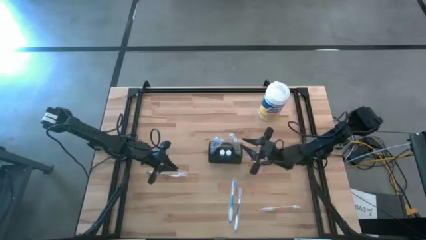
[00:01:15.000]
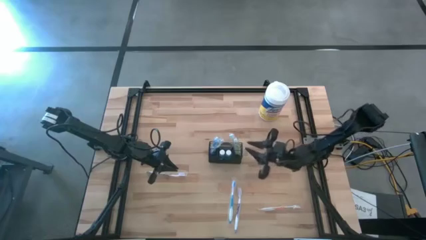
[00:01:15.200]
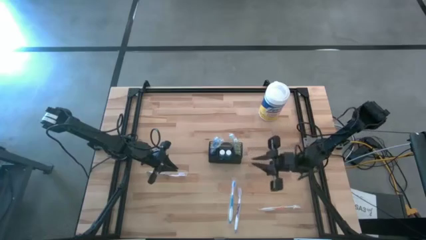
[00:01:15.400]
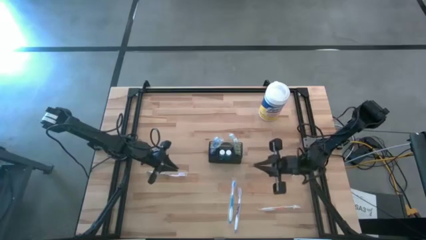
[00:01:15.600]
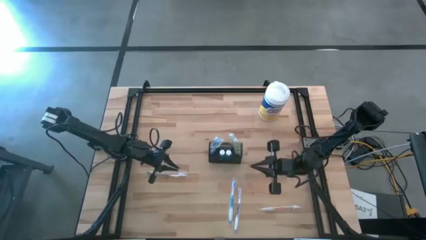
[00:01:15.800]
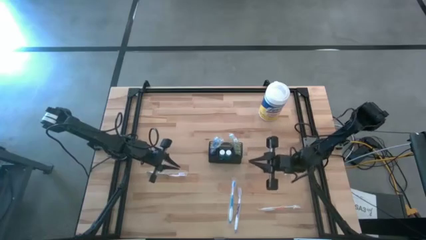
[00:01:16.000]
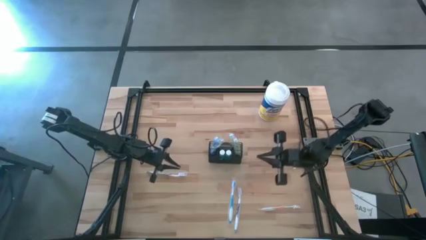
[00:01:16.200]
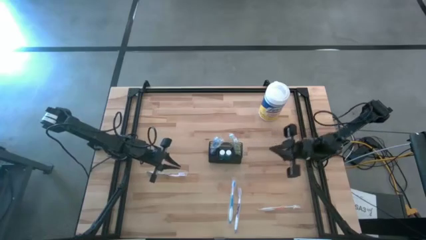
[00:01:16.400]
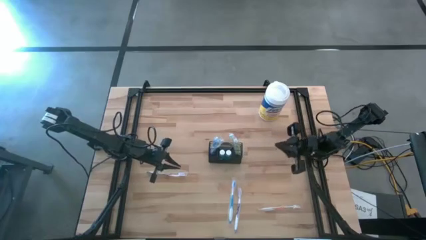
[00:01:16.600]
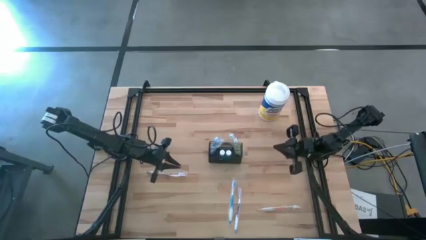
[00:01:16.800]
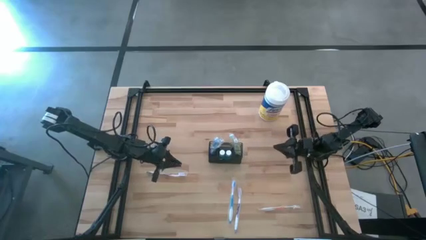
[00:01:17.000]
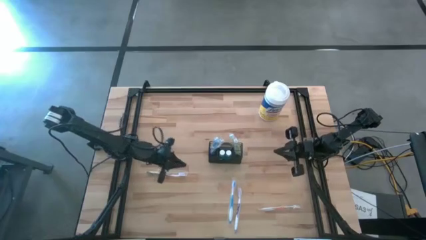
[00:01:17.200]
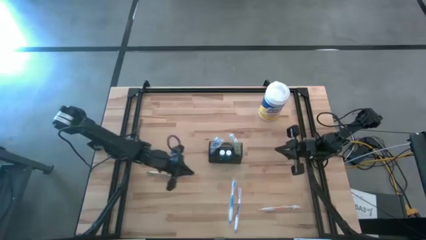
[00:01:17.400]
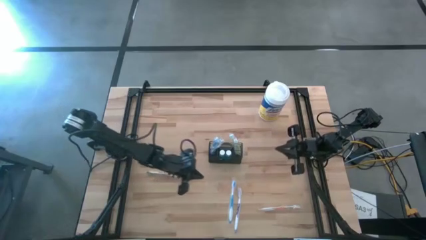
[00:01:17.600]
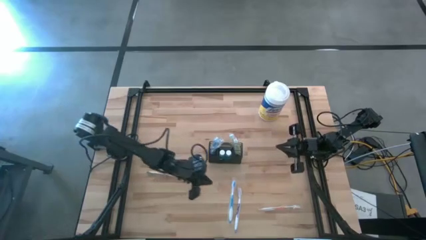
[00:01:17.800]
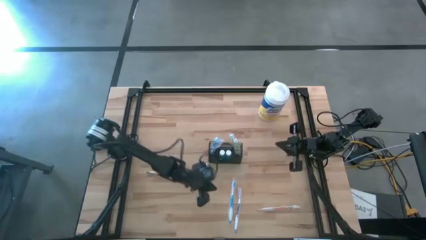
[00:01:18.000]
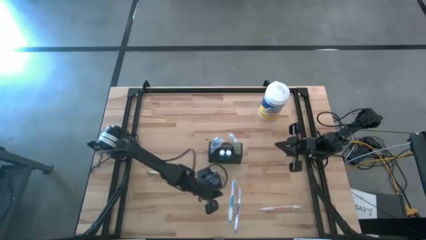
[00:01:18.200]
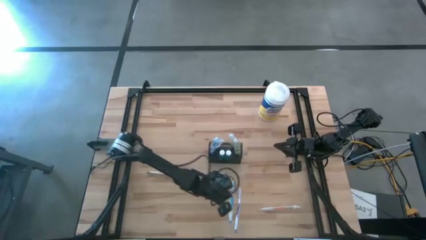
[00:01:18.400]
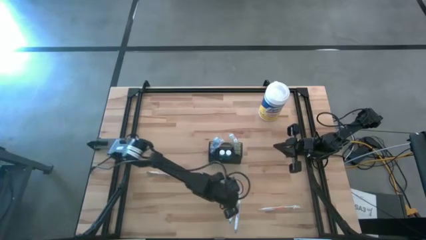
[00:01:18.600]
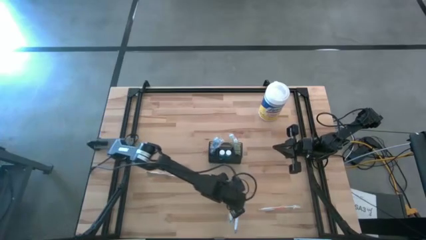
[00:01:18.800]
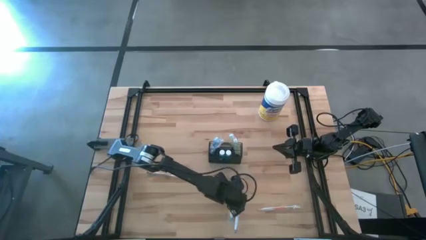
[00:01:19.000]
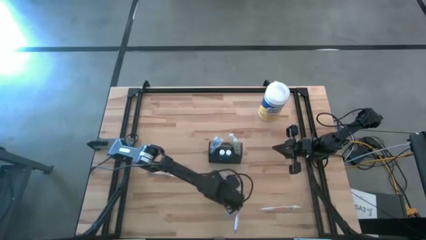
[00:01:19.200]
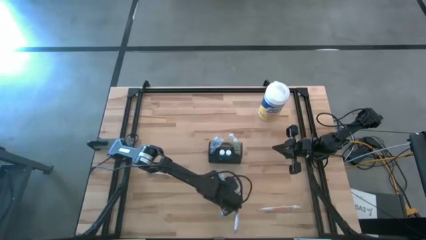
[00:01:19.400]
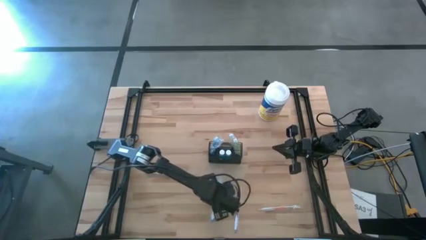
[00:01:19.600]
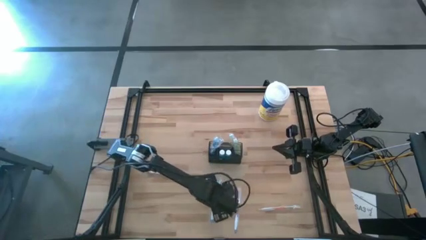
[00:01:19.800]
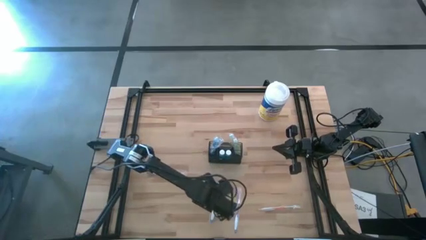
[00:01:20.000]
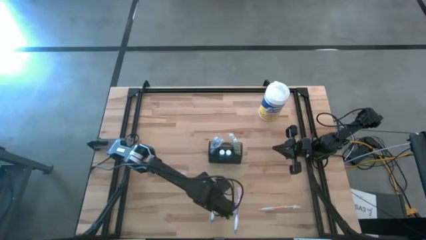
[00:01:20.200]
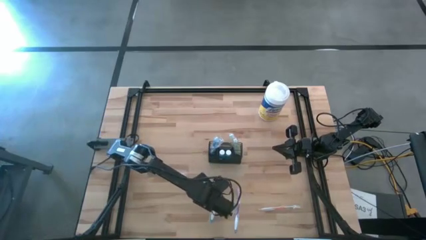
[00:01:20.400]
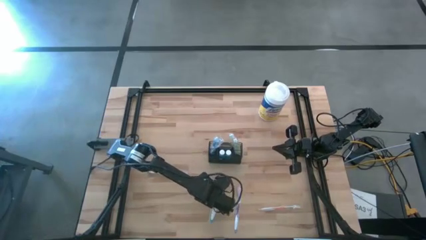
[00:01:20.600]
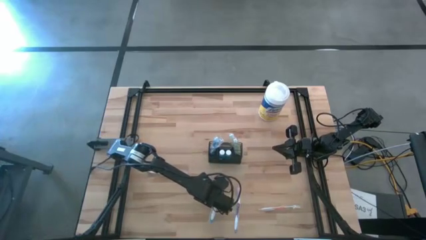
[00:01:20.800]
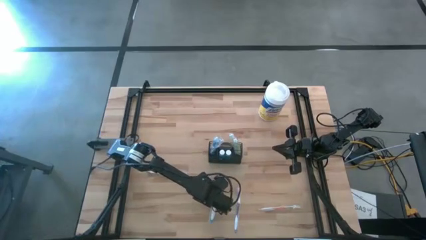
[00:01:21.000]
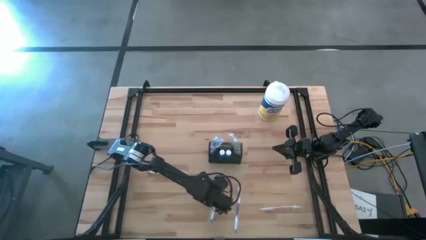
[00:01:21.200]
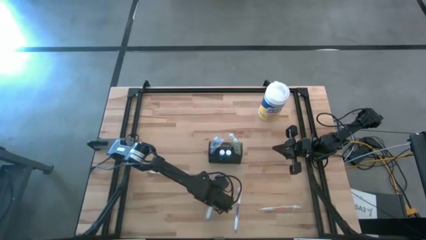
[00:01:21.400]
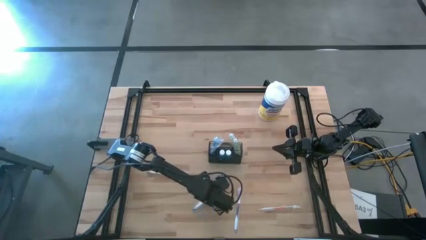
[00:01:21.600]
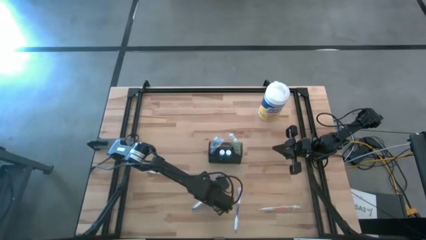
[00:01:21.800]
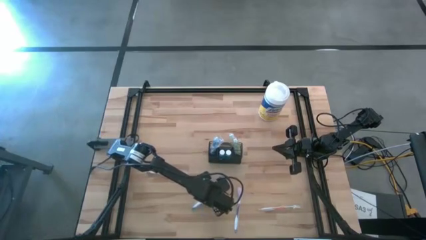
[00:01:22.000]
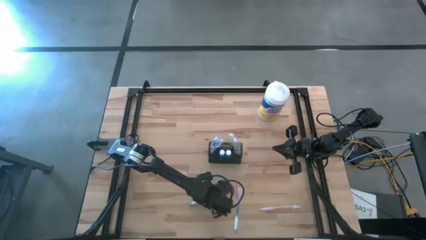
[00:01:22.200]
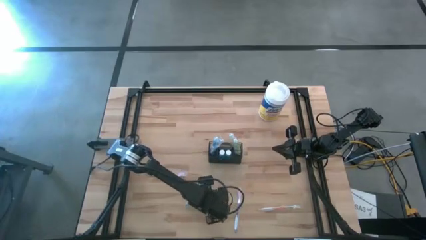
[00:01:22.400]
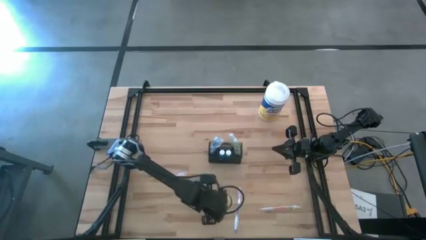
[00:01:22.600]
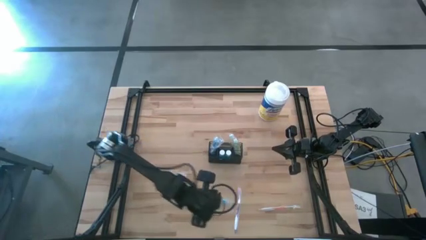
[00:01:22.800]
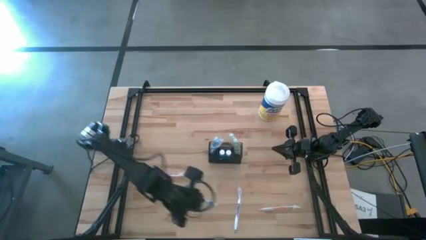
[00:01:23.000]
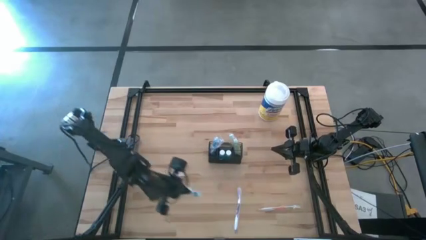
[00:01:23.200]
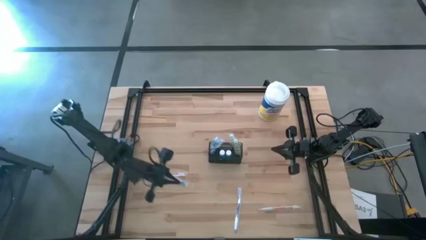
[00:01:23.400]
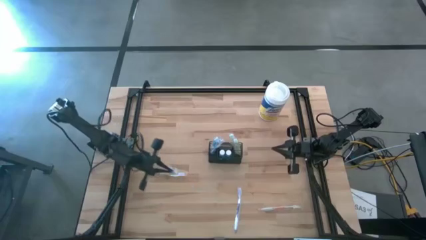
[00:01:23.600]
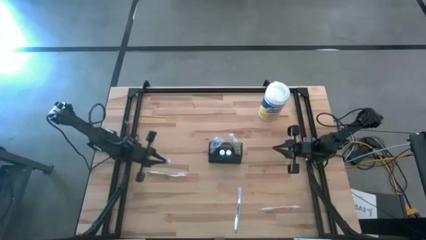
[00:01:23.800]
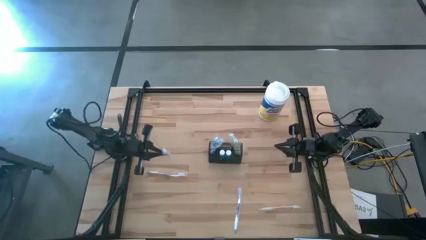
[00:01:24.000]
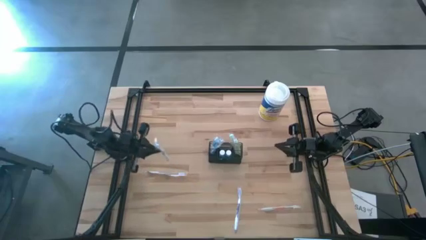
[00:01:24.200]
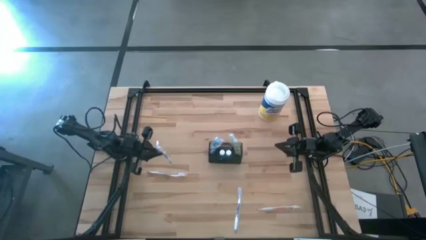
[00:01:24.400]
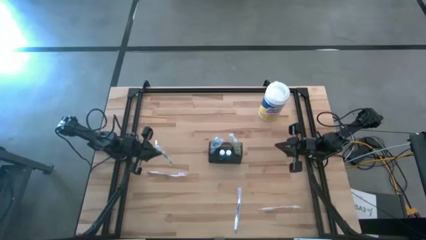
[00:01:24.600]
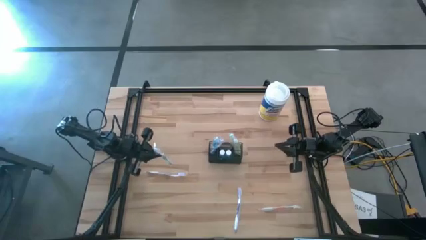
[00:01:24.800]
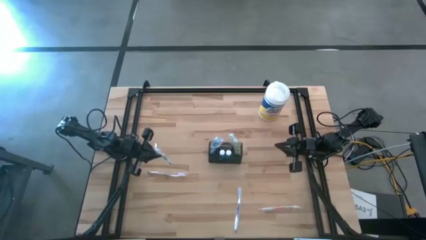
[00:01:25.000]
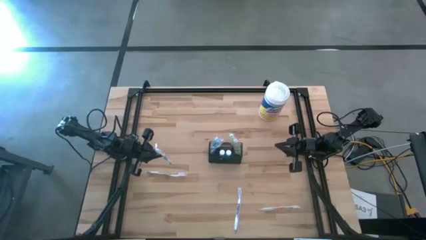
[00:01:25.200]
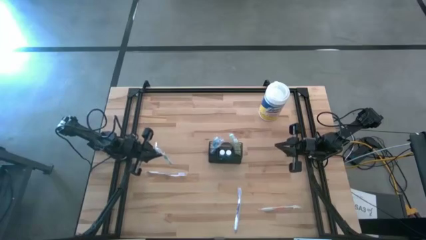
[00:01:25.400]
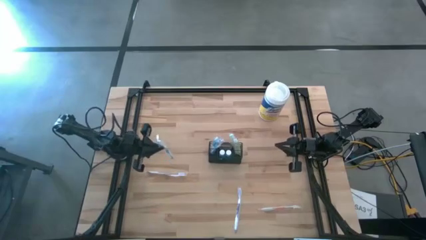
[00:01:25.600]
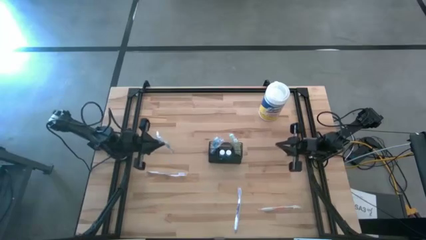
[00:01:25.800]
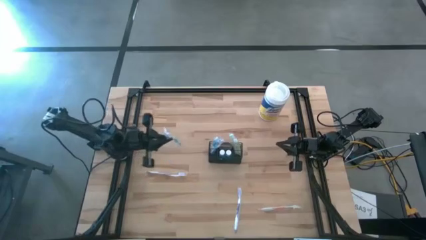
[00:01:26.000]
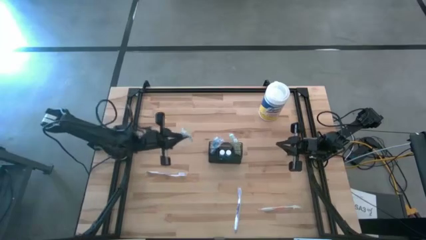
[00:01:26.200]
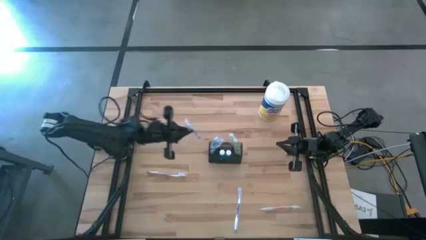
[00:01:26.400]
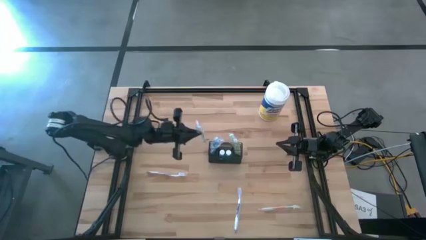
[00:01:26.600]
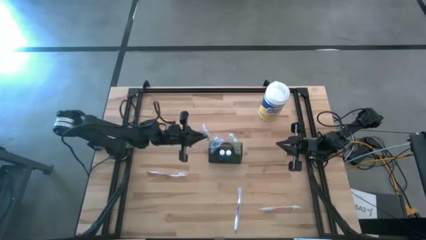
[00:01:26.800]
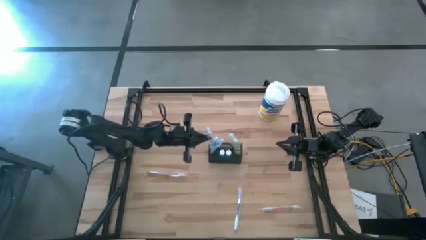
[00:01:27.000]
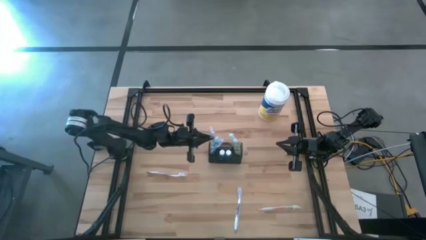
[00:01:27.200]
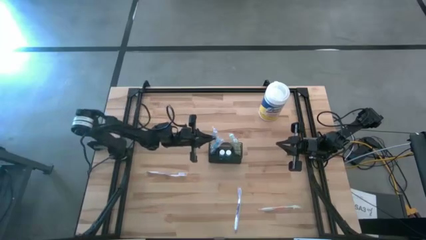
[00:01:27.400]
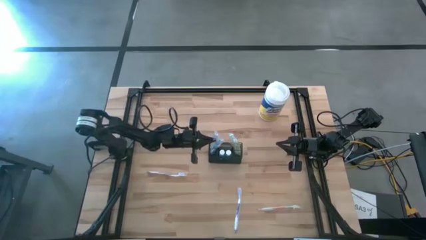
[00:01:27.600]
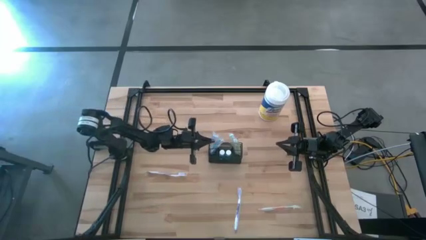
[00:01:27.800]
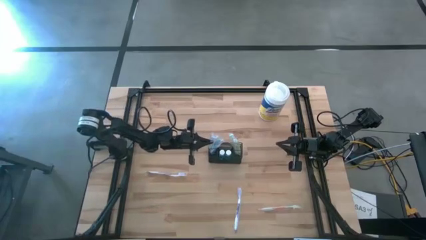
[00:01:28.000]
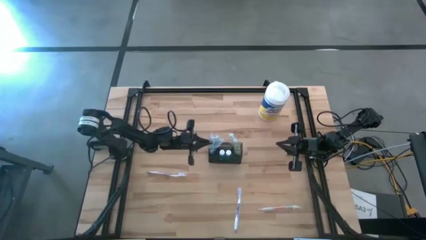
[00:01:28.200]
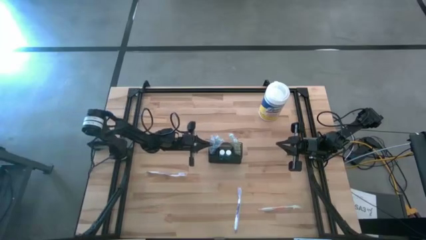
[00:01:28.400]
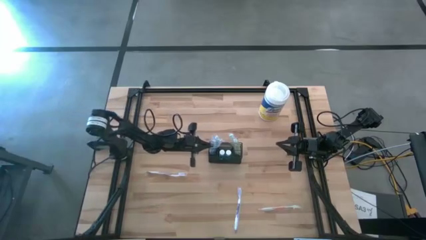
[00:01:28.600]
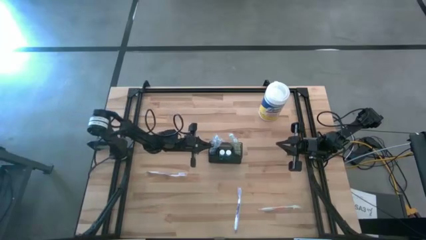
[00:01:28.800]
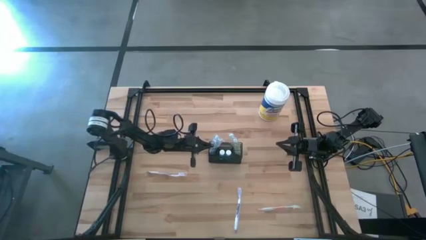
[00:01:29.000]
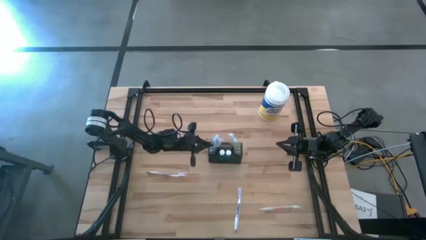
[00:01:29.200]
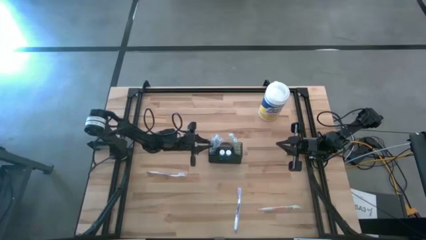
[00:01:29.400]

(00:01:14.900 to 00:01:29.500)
Task: Pick & Place toothbrushing station
Put the blue toothbrush into the wire organizer
